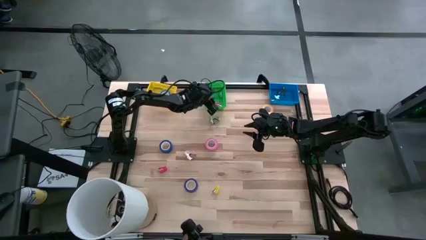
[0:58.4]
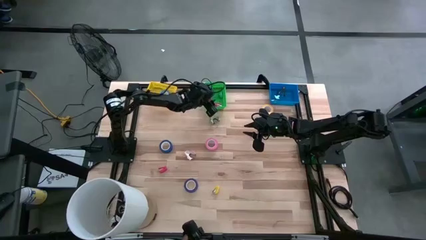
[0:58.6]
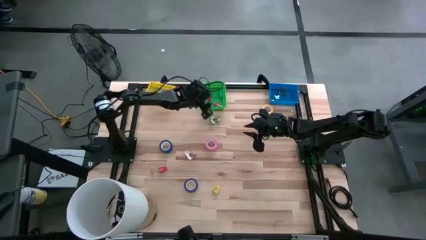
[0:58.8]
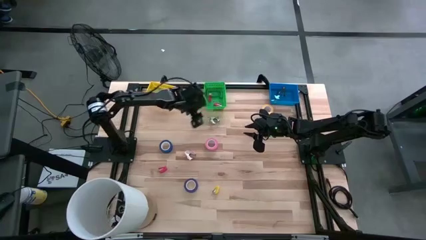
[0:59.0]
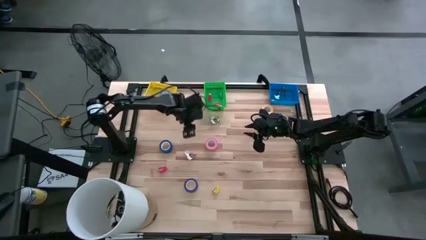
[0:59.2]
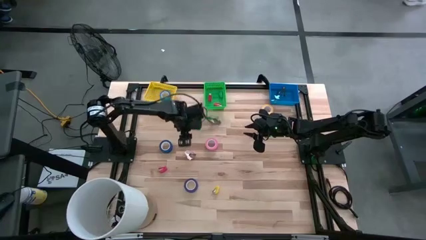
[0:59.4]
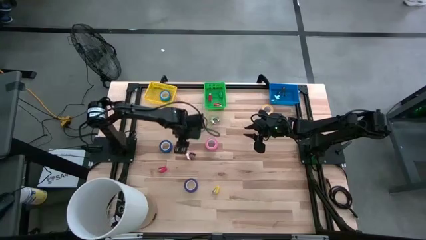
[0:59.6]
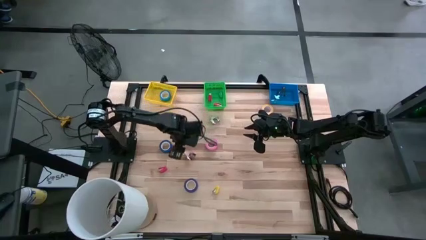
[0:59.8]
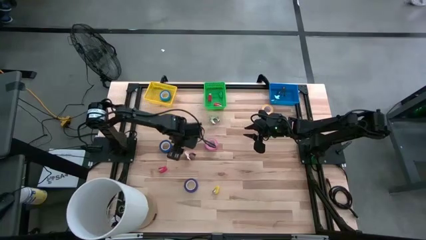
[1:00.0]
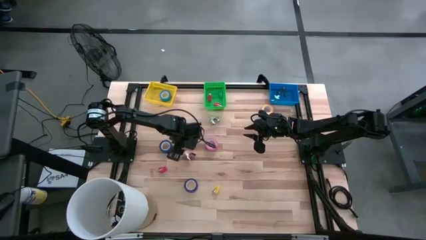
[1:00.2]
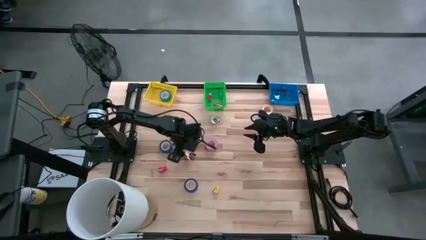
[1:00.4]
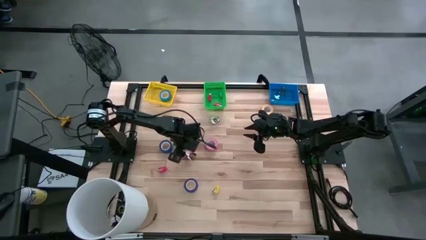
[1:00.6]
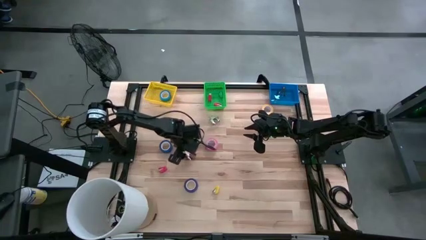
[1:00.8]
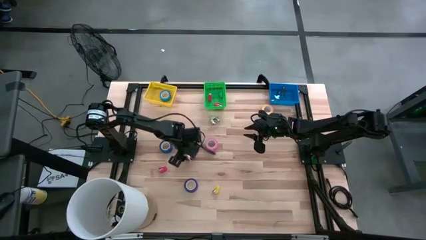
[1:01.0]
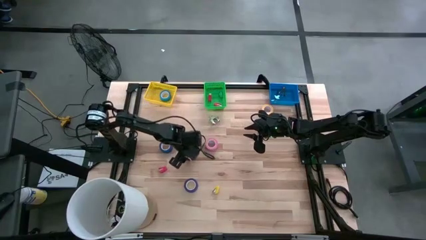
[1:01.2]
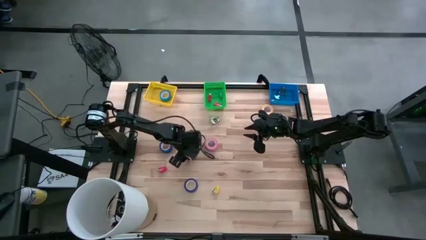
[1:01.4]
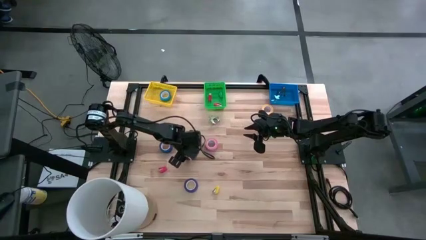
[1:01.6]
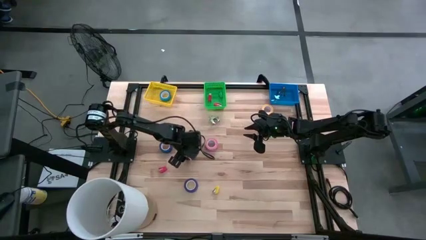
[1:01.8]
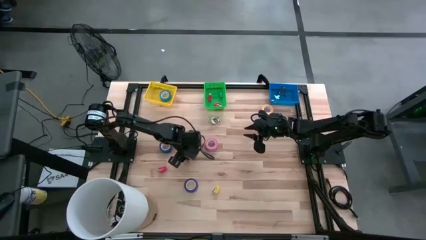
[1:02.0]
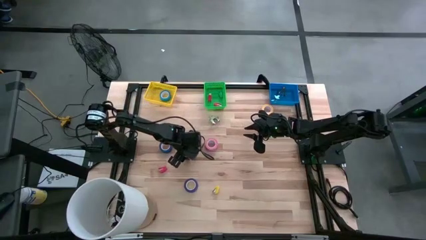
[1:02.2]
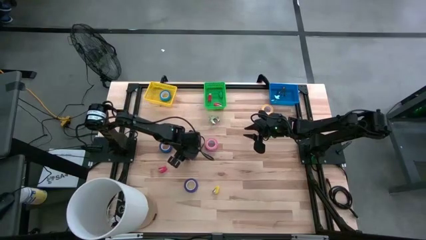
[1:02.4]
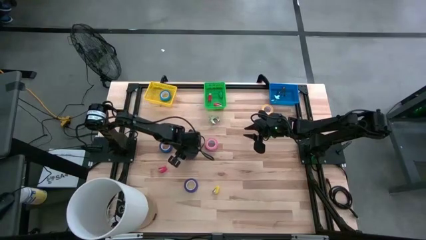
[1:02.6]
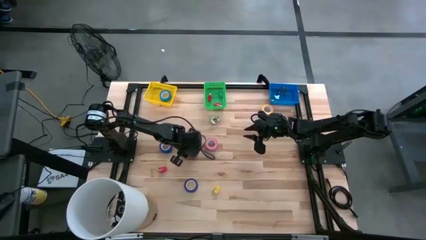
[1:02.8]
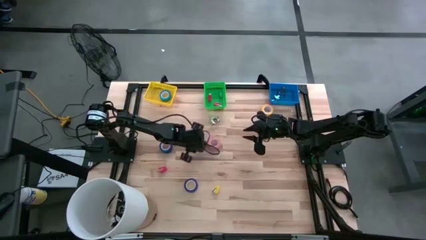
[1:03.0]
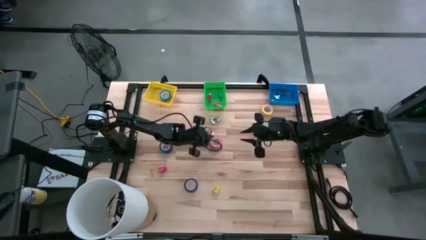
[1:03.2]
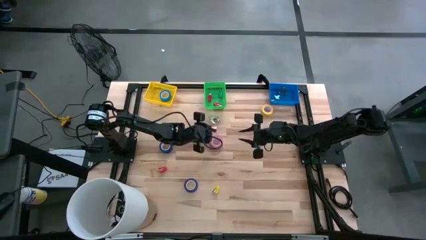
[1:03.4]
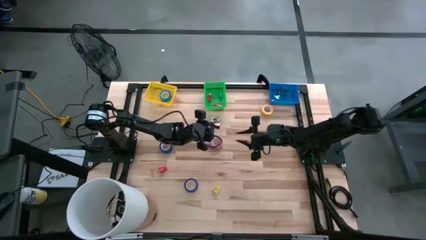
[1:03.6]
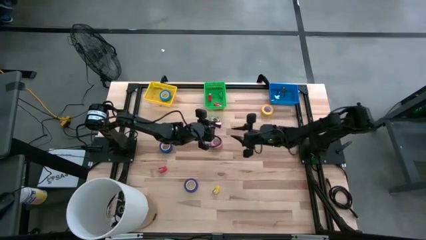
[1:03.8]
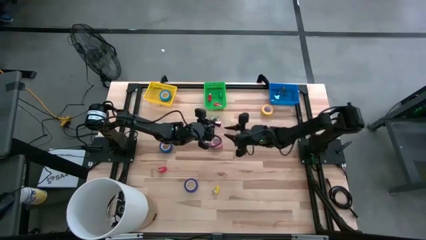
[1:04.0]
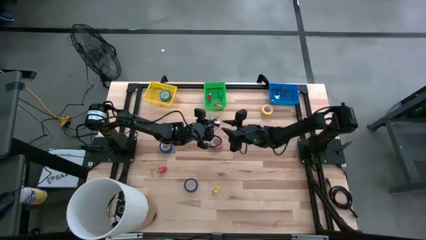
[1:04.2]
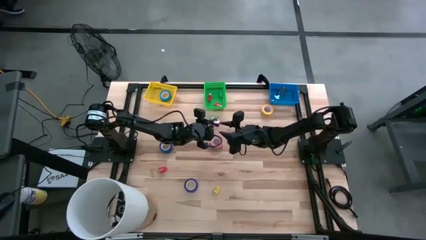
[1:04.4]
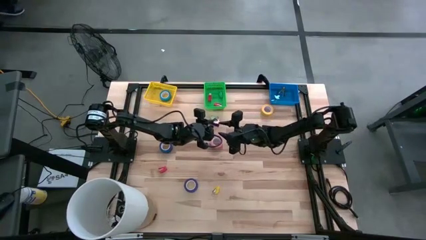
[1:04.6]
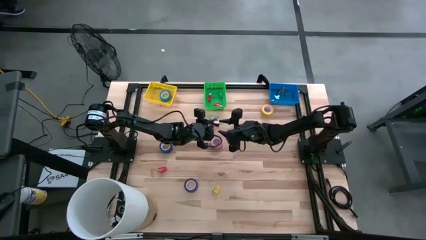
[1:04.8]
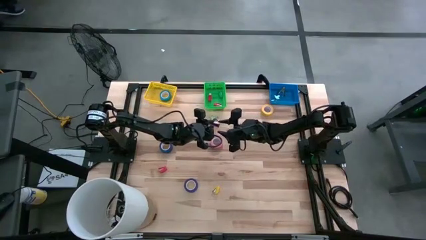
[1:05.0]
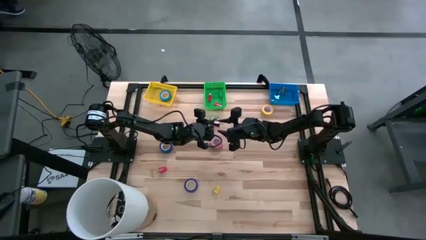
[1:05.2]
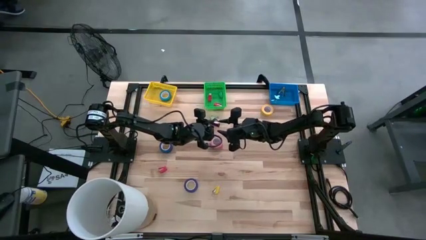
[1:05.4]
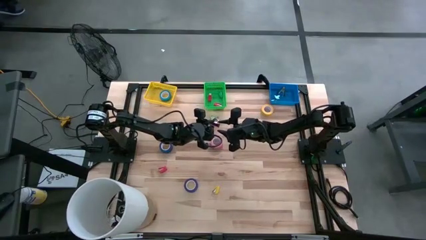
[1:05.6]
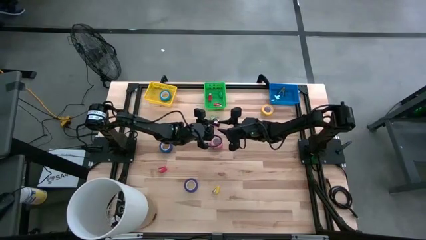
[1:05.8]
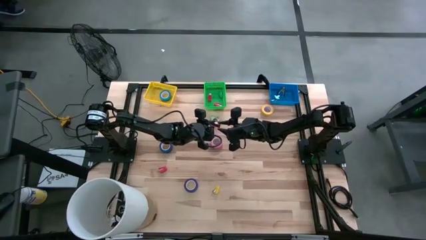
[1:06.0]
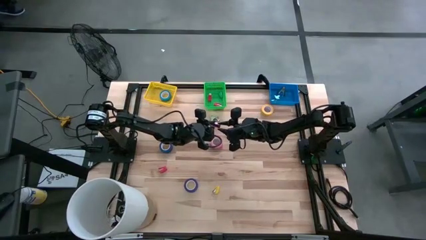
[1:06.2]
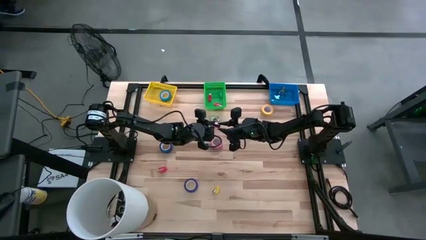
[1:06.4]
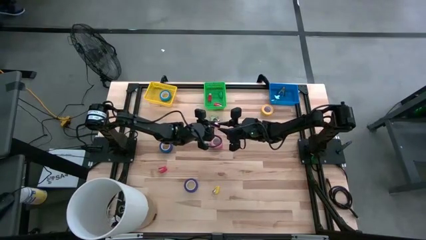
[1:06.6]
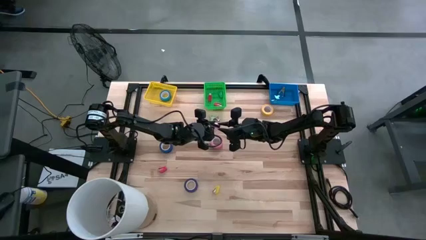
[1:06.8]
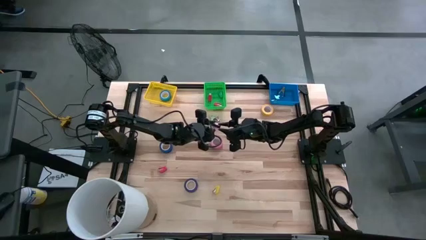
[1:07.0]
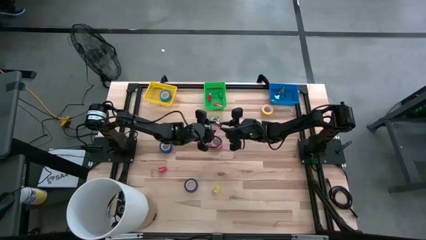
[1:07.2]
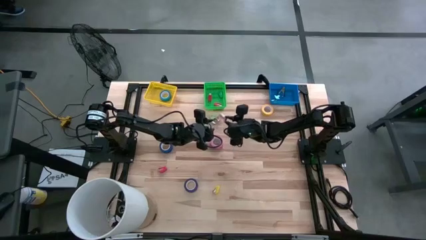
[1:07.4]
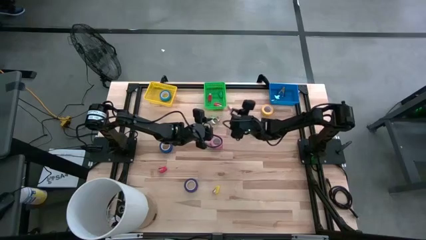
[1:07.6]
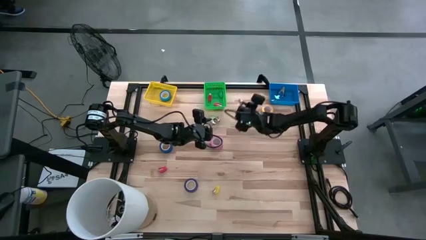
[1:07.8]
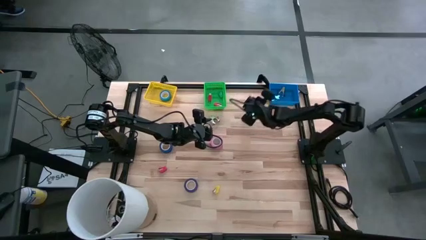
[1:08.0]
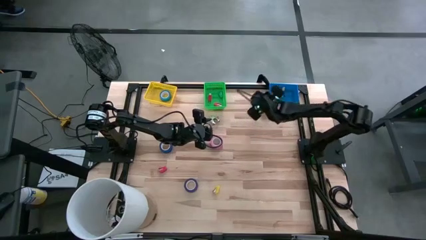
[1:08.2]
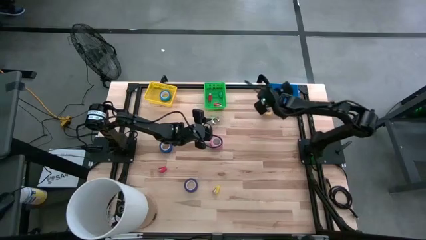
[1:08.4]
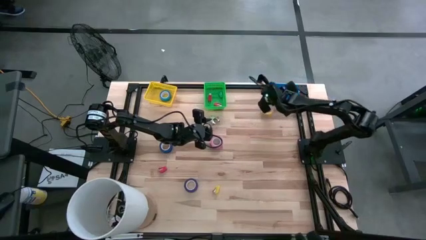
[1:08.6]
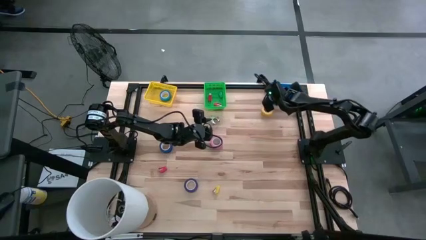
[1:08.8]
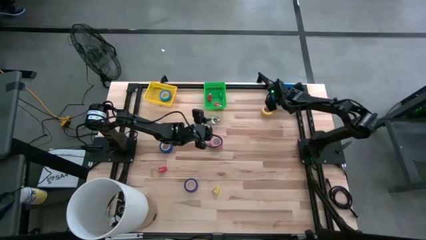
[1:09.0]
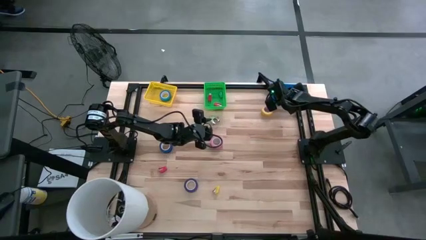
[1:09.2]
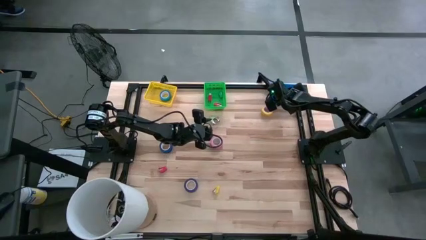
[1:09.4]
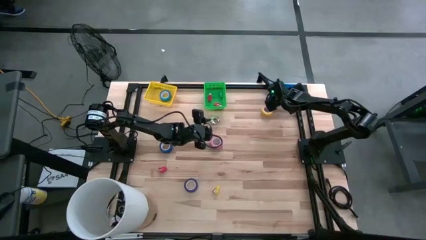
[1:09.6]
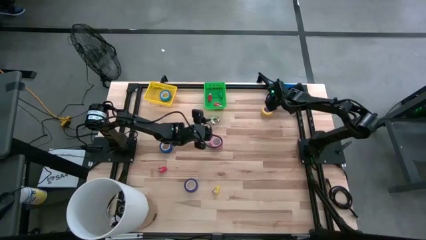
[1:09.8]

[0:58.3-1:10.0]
Task: Pick and place Stapler, Stapler remover, tape
Put the pink staple remover into the blue basket

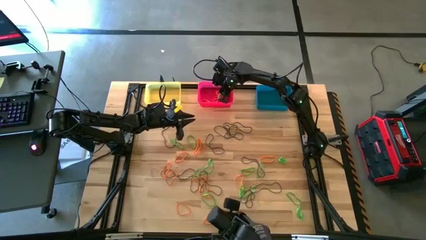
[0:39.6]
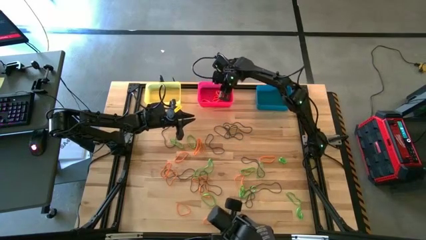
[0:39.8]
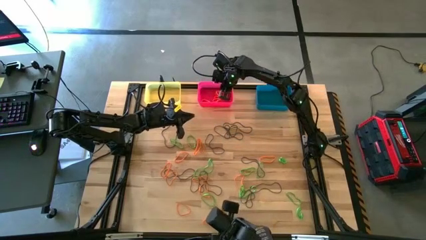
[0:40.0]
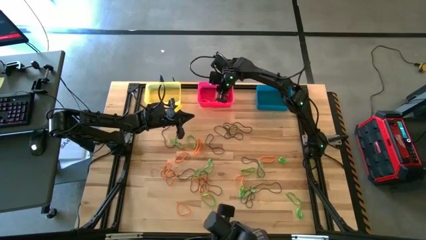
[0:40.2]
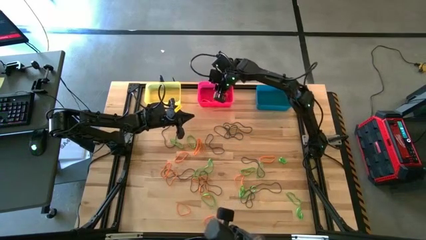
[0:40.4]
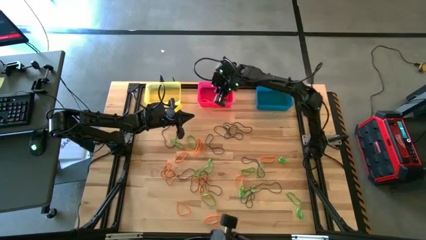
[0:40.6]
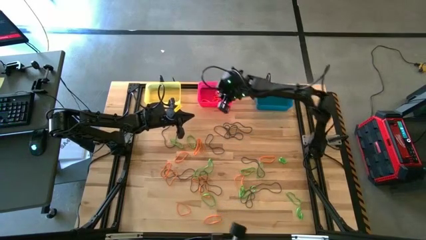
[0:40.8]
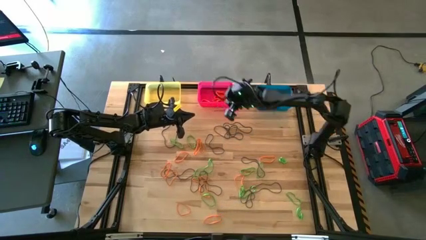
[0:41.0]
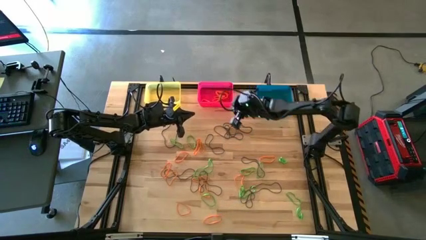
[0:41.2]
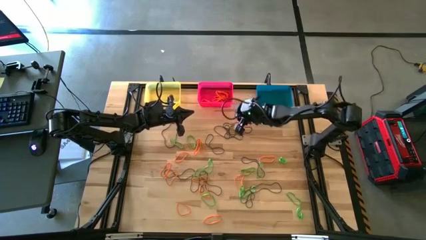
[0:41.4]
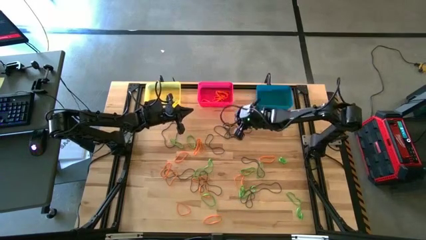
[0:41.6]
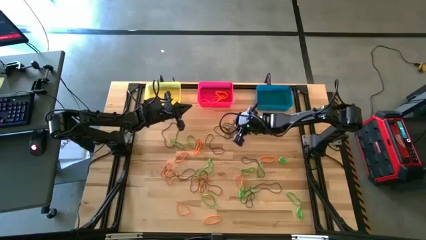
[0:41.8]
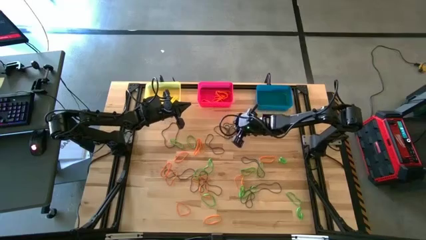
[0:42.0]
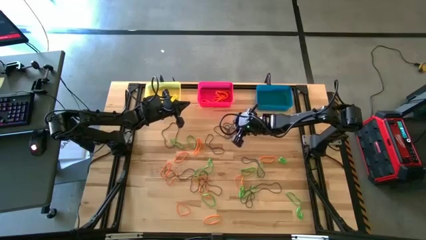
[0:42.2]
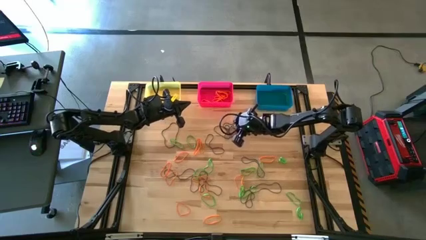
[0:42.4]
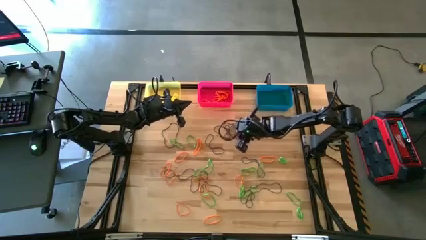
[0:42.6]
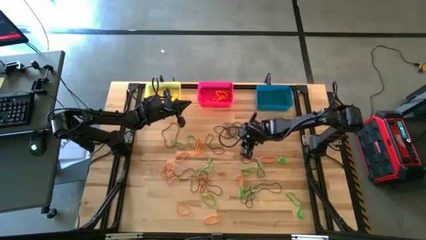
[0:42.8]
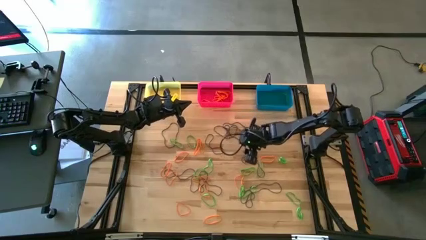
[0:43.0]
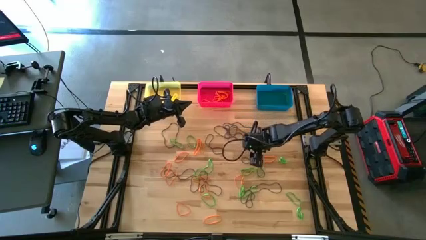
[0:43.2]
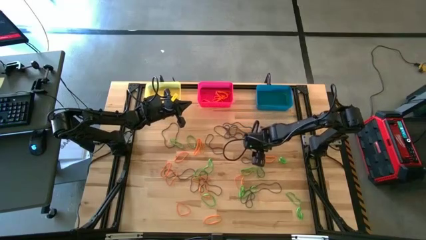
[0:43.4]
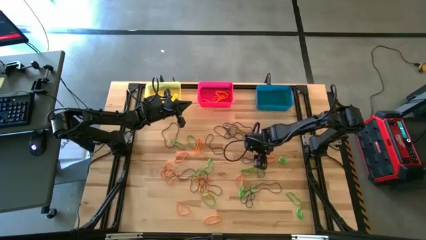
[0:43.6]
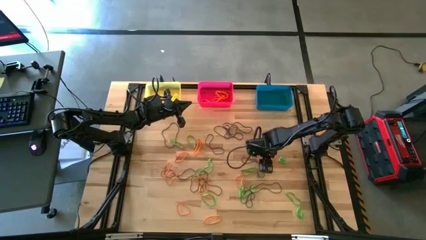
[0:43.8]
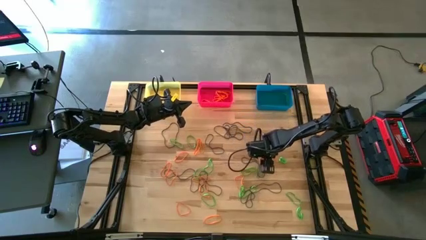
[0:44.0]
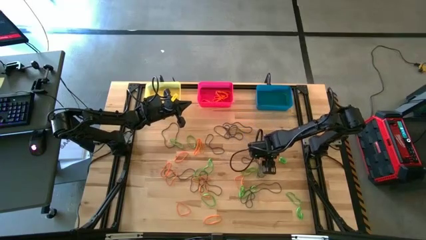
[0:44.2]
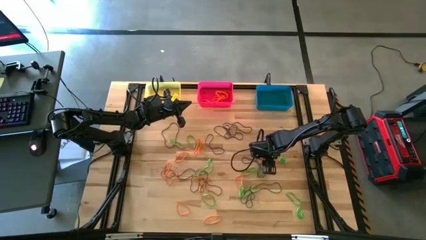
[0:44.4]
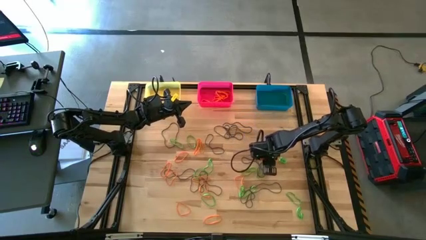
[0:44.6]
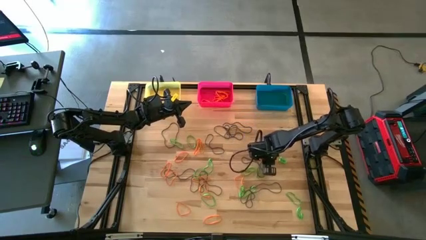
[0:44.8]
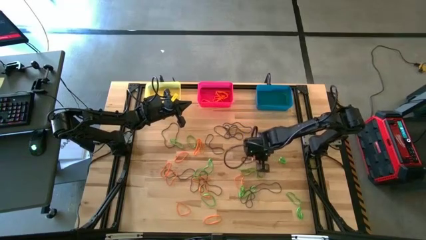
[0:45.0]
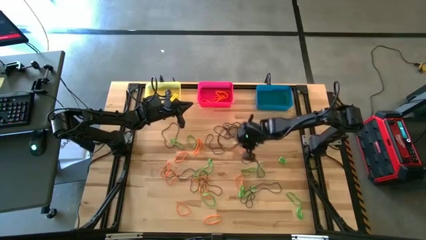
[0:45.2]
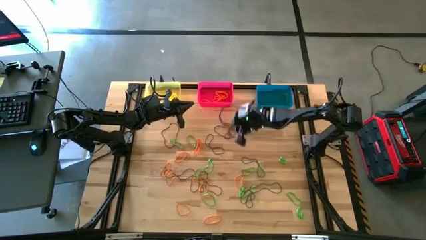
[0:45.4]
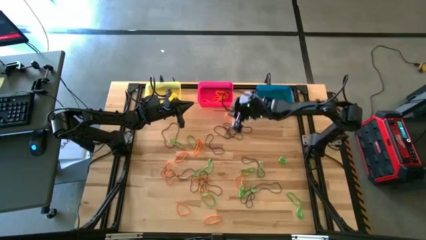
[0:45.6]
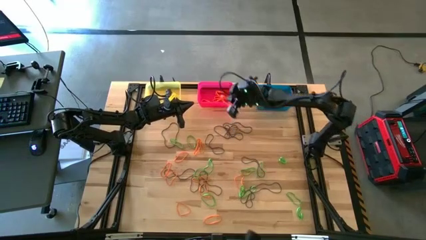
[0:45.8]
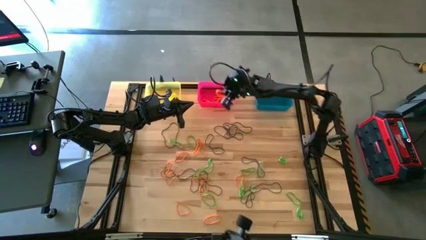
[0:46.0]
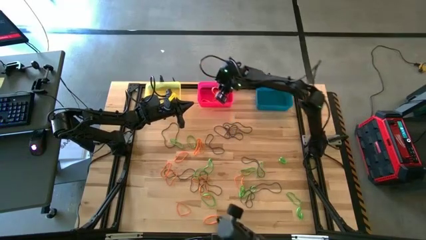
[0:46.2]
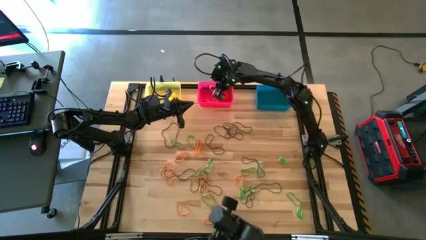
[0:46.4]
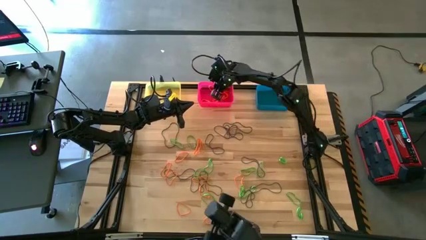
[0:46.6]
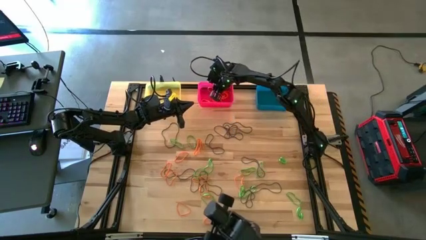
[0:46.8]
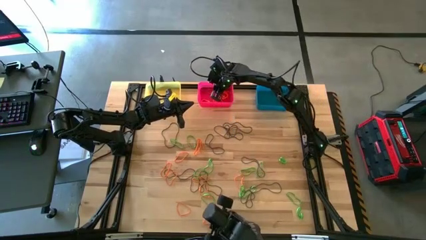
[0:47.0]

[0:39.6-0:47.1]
Task: Sort rubber bands into baskets
Put the orange rubber band into the pink bin
